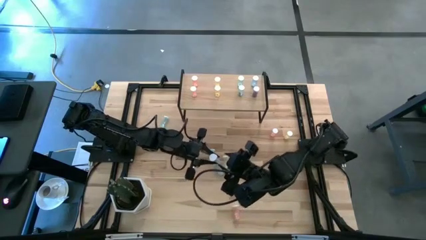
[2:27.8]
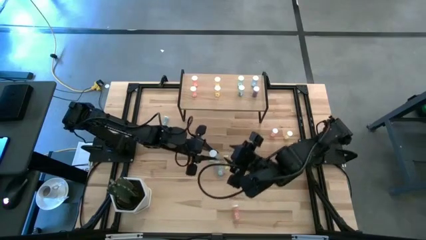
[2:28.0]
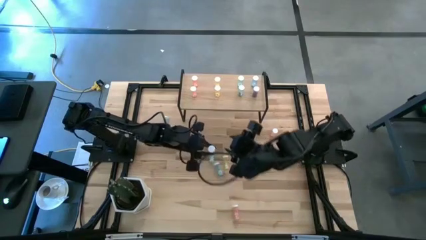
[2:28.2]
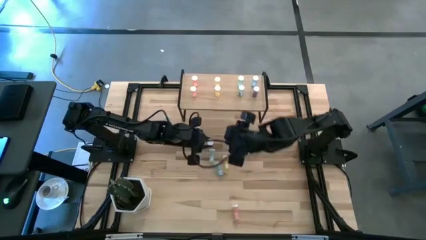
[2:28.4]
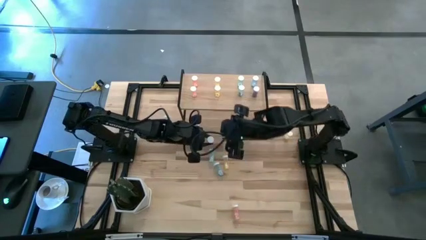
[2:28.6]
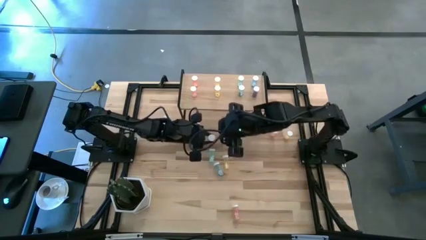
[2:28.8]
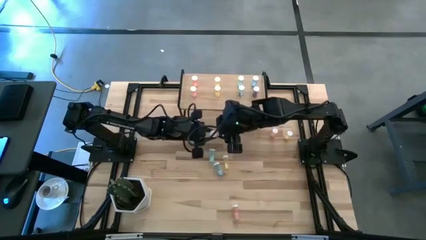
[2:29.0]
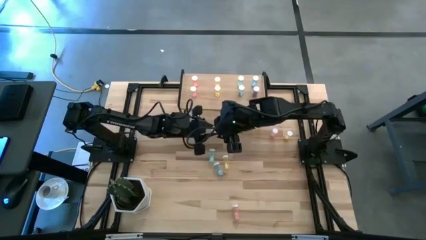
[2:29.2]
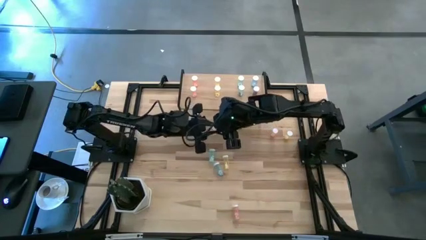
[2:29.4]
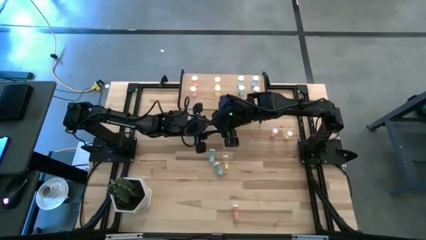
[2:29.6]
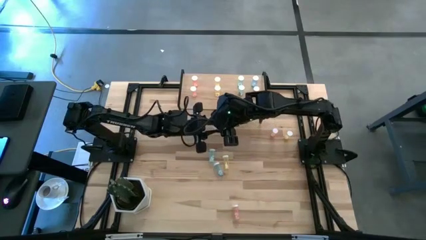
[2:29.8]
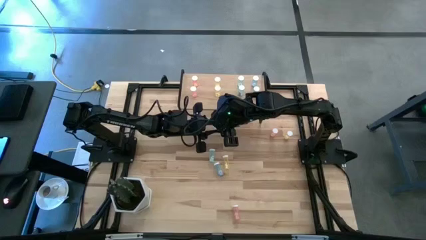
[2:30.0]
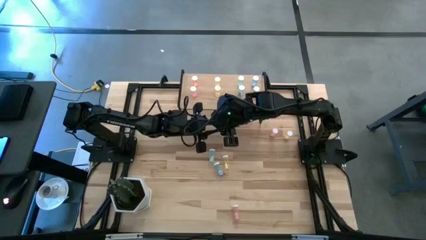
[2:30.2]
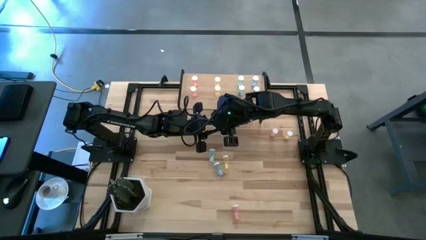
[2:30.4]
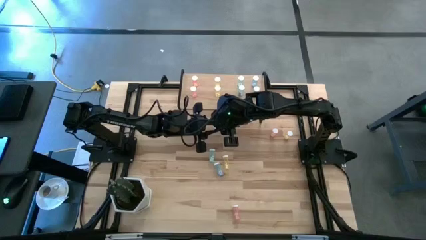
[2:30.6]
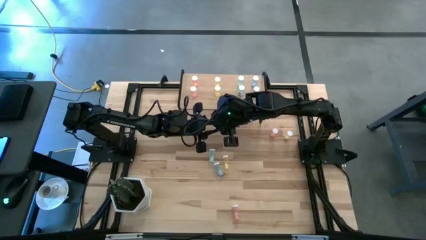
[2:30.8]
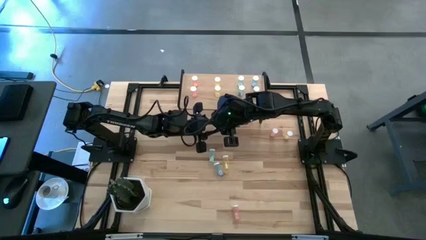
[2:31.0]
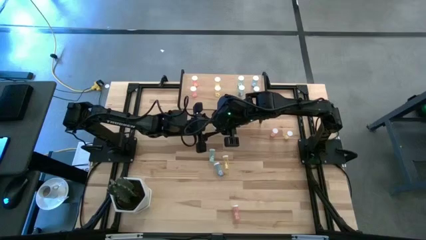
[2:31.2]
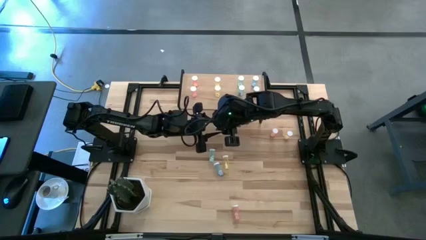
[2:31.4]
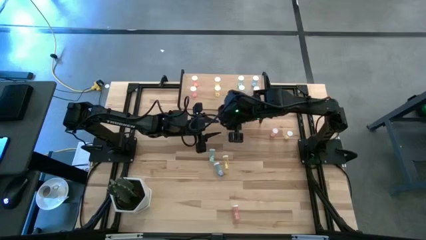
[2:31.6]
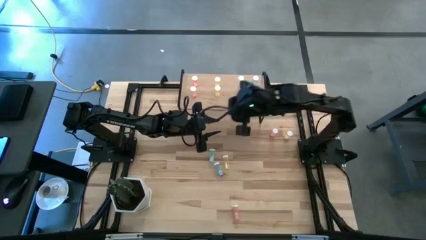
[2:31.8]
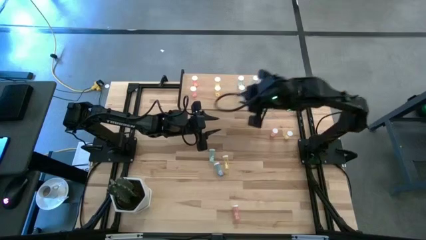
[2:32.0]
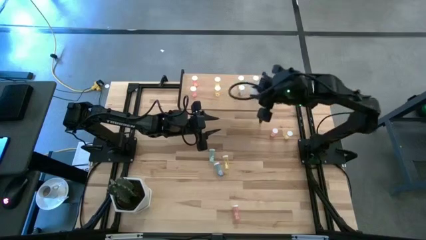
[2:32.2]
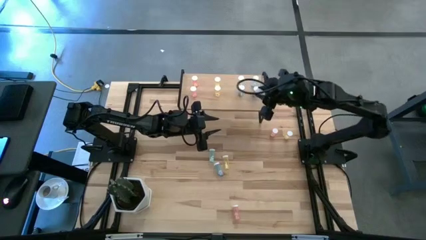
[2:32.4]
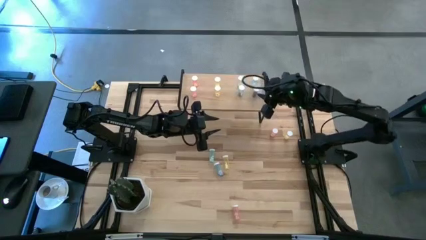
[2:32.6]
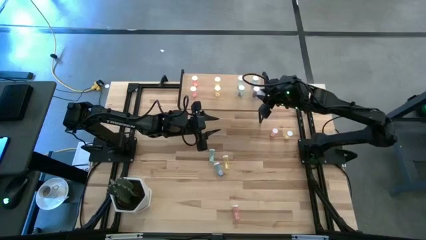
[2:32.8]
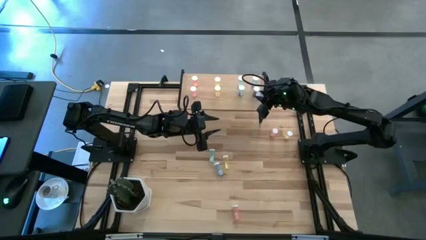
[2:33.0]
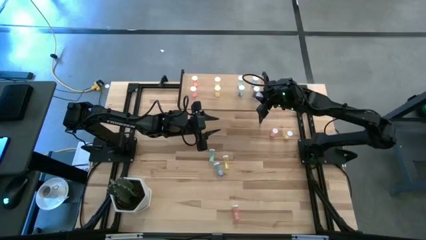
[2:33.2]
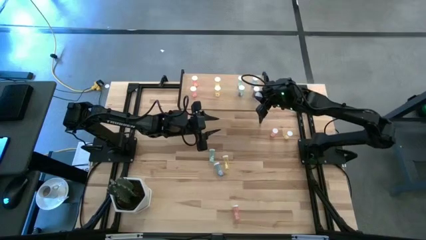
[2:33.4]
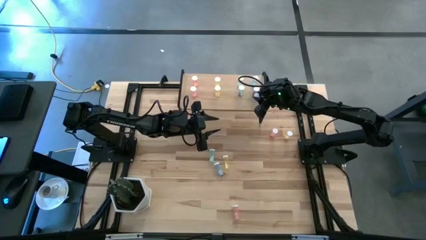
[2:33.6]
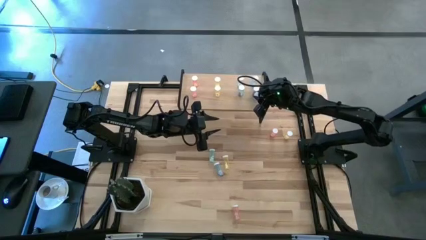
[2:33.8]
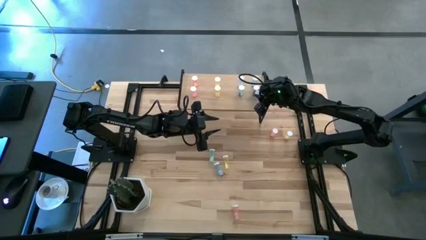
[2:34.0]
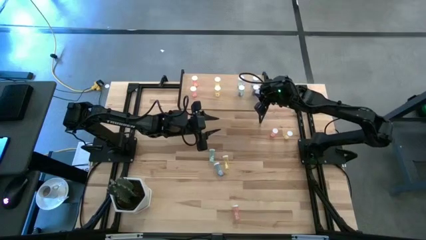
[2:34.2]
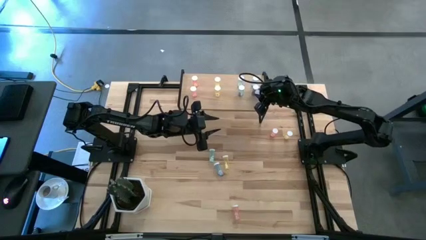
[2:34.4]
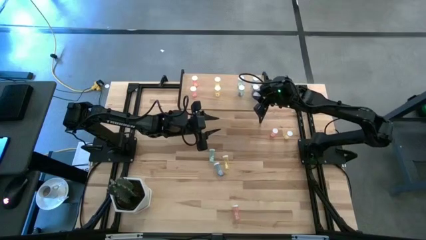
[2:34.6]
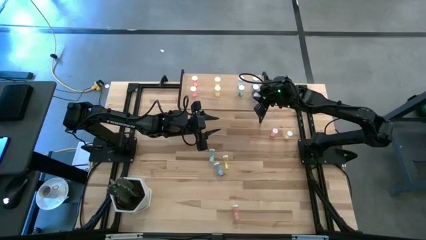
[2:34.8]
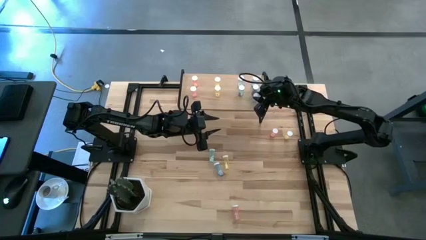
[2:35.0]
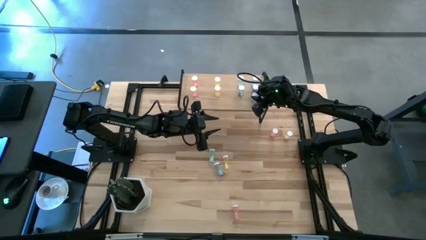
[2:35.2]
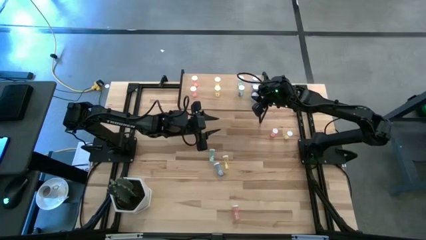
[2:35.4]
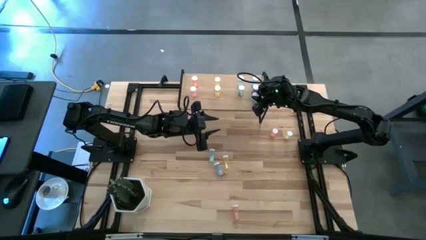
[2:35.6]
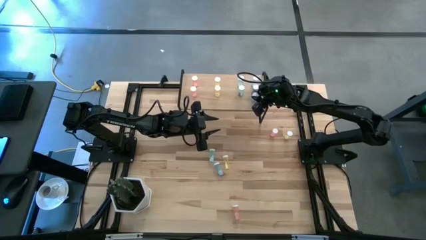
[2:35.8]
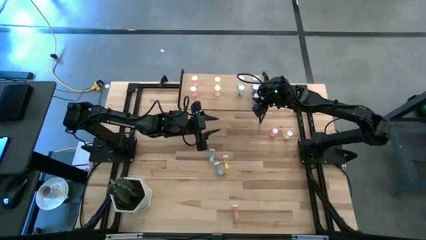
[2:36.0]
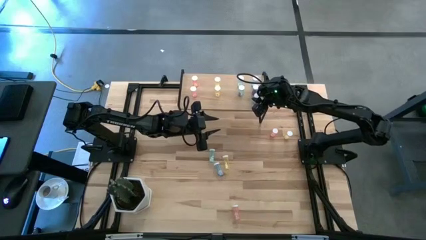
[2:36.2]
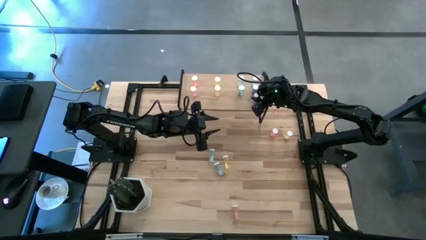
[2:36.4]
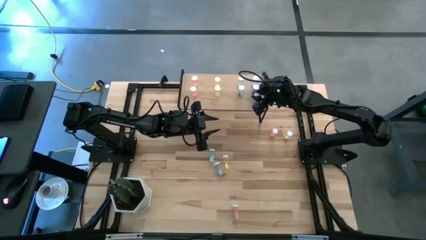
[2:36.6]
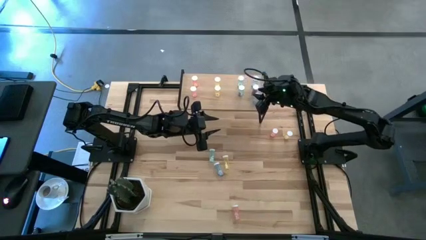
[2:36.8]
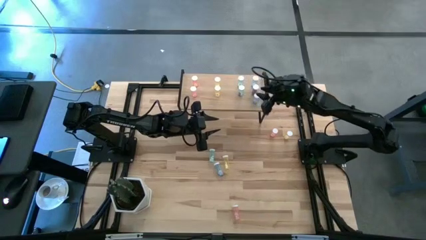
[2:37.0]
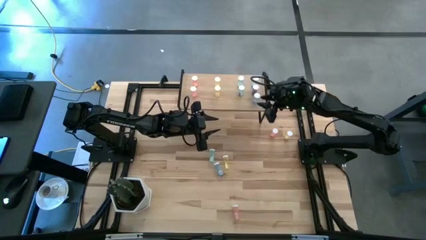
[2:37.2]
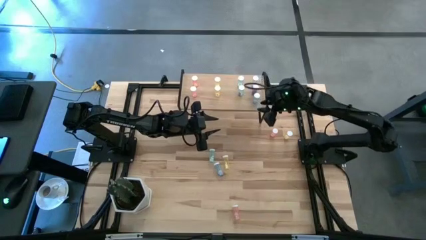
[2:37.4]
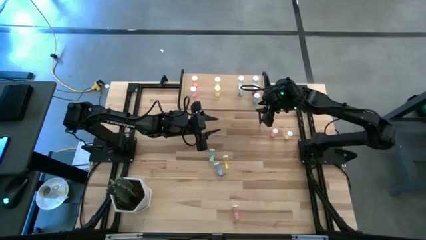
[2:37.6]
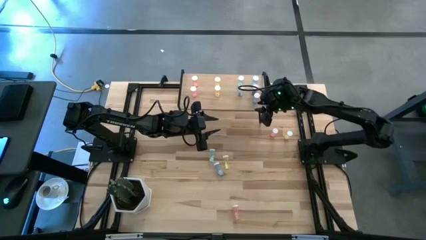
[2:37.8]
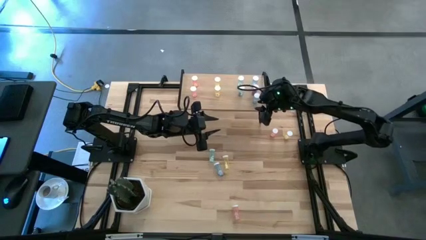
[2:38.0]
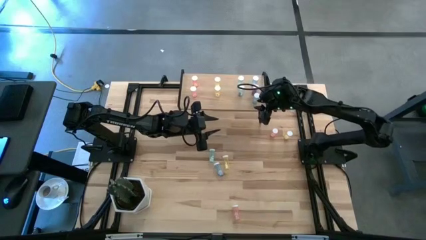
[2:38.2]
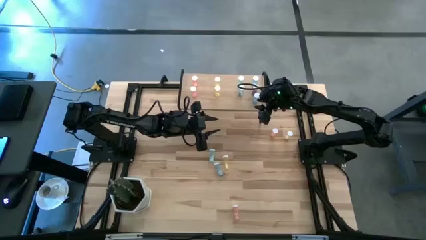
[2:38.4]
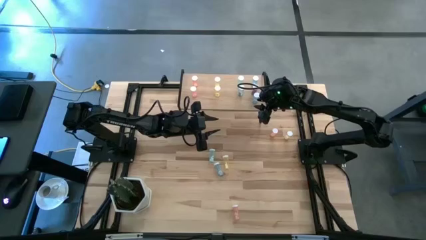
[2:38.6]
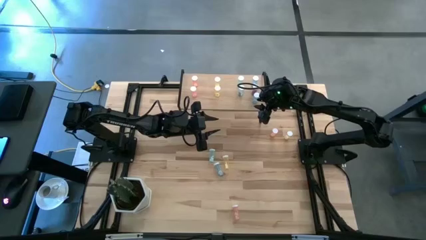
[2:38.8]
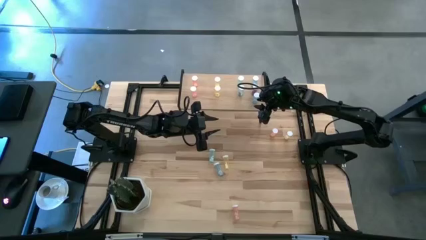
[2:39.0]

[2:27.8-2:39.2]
Task: Pick and place medicine bottles onto shelf by color
Put the blue pill bottle on the shelf aligned with the other blue pill bottles
